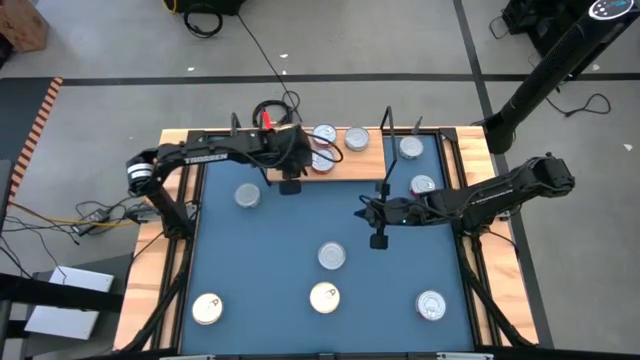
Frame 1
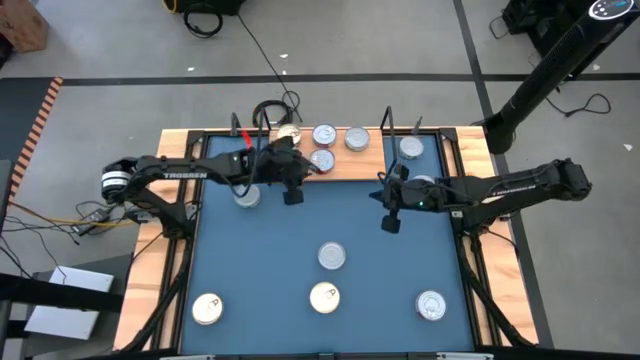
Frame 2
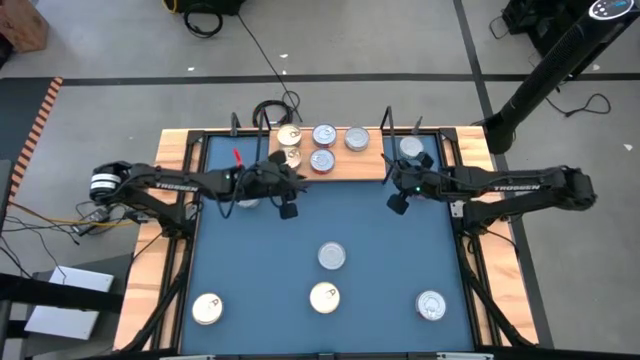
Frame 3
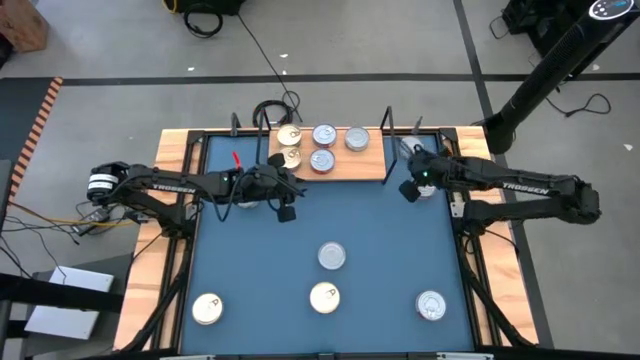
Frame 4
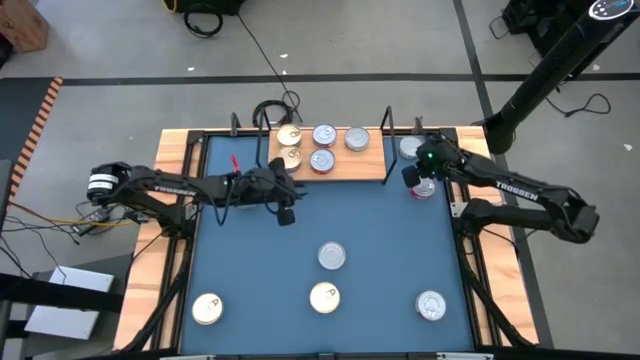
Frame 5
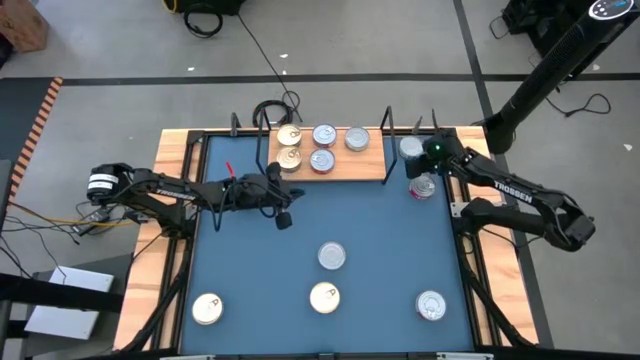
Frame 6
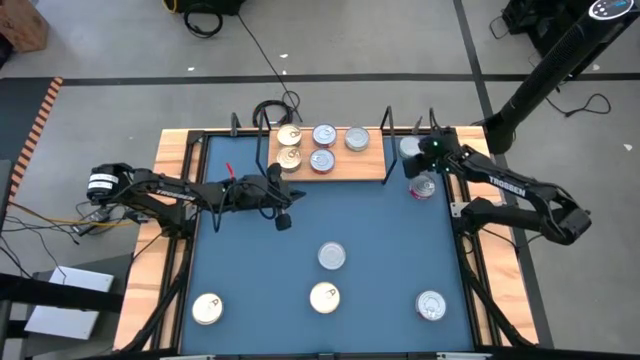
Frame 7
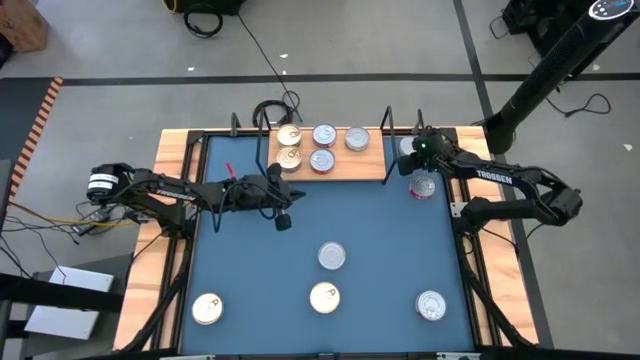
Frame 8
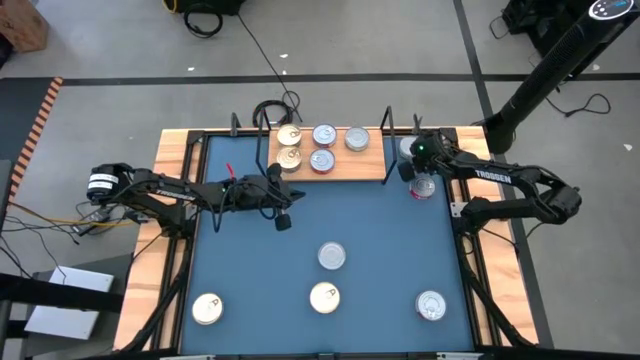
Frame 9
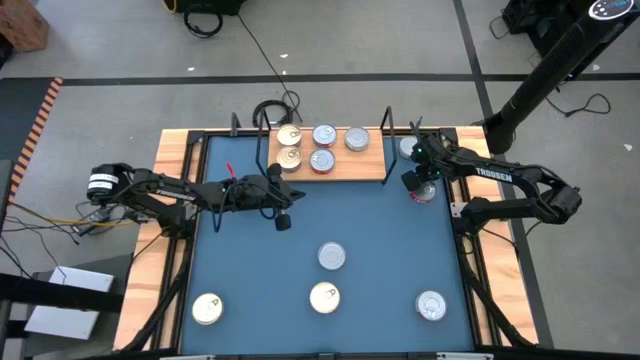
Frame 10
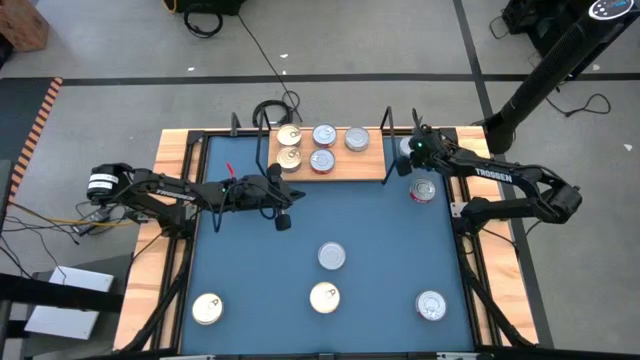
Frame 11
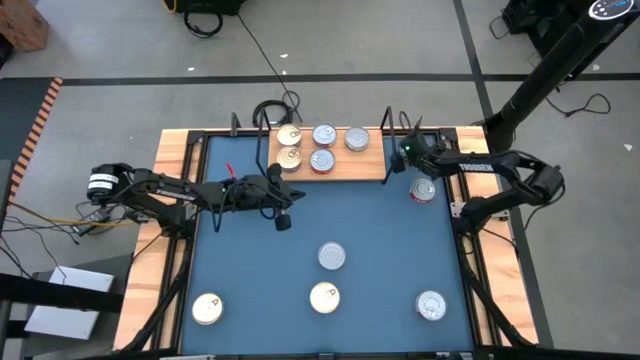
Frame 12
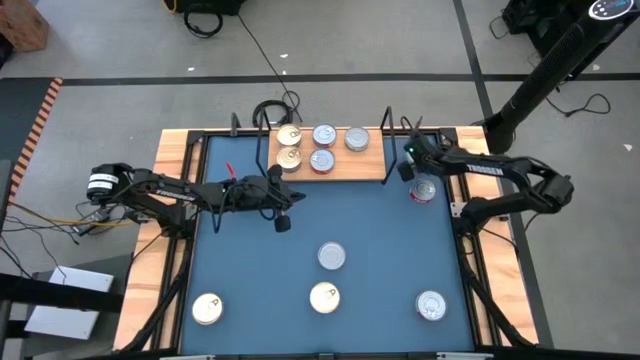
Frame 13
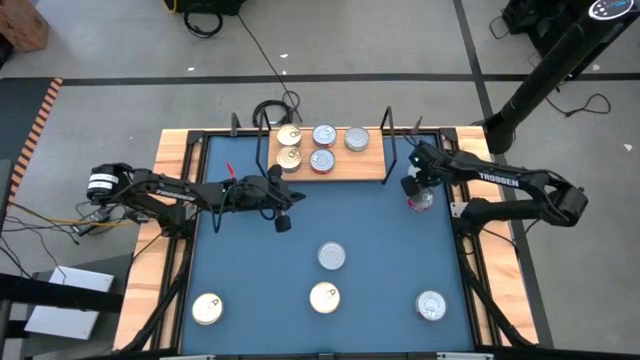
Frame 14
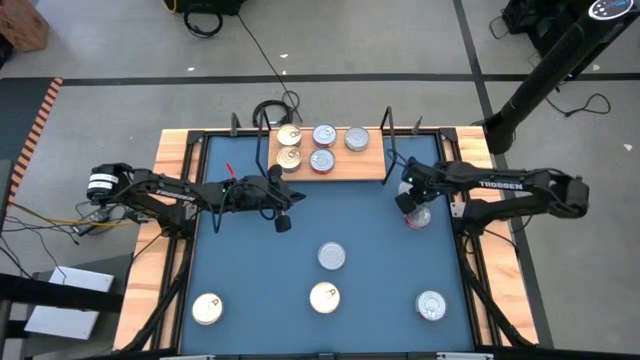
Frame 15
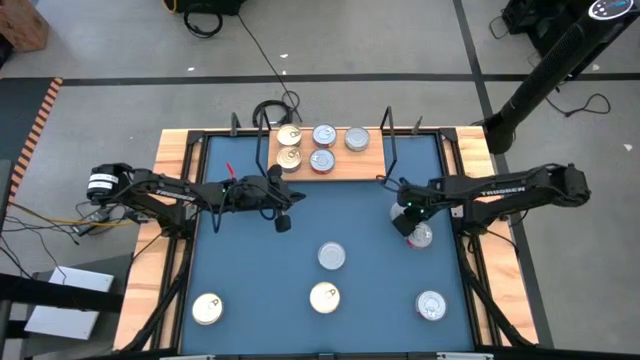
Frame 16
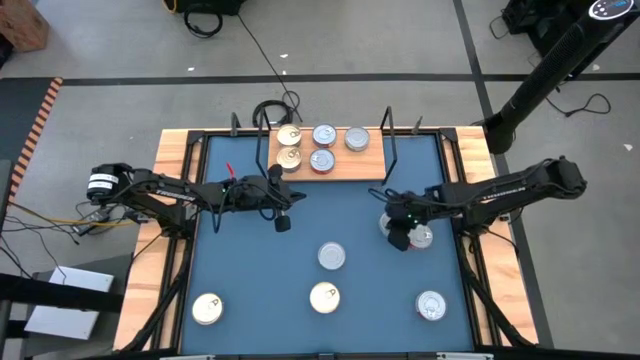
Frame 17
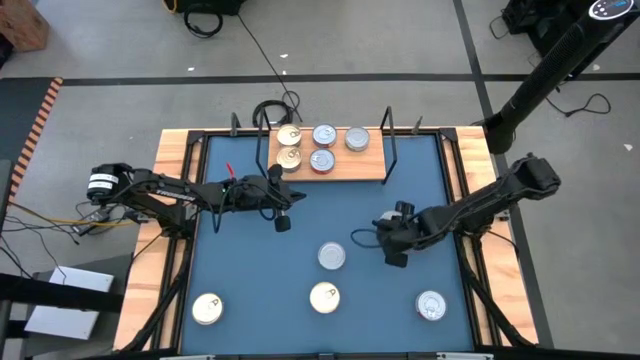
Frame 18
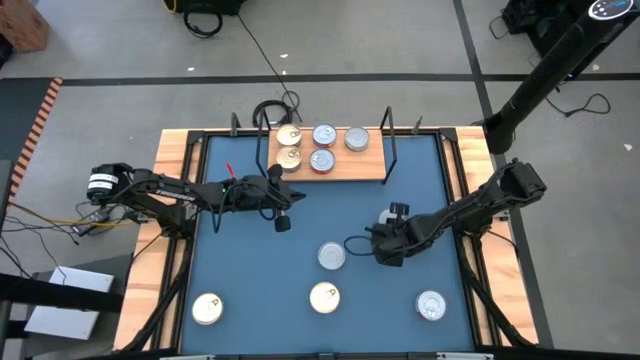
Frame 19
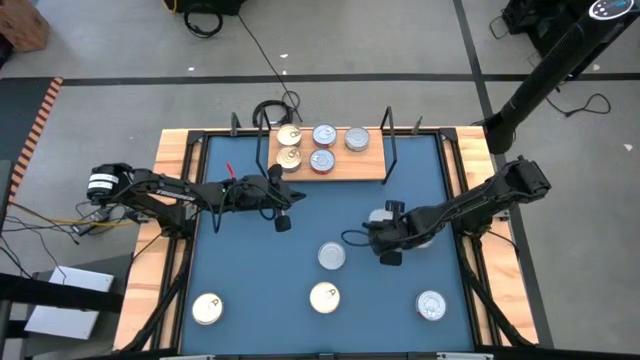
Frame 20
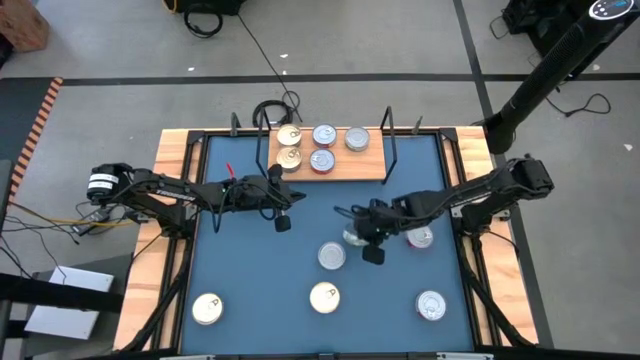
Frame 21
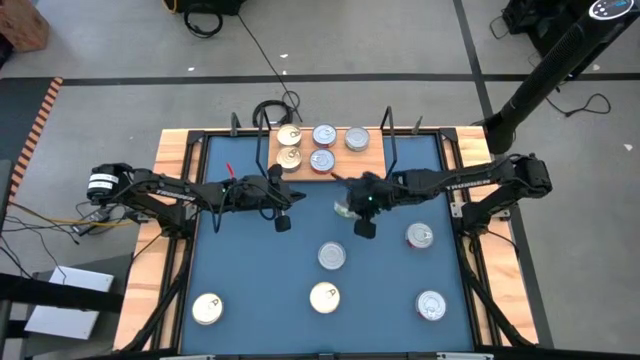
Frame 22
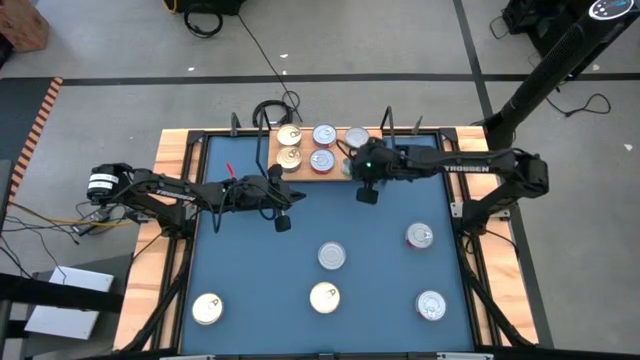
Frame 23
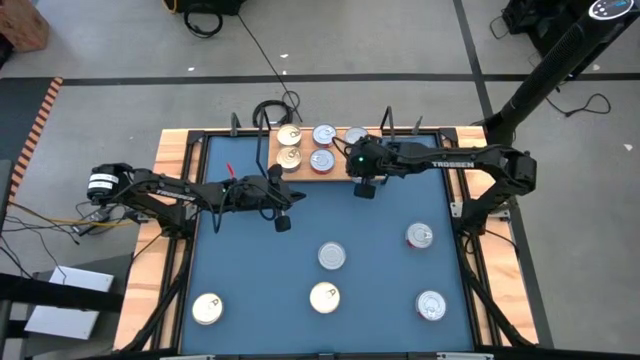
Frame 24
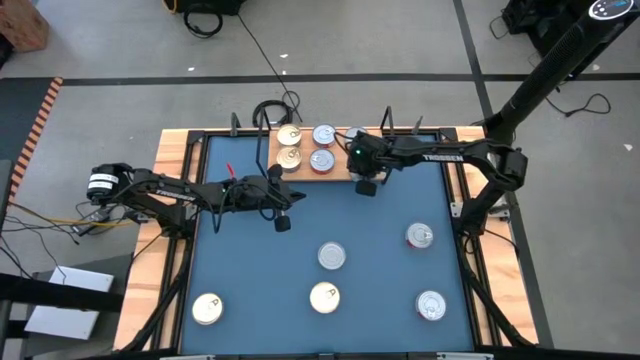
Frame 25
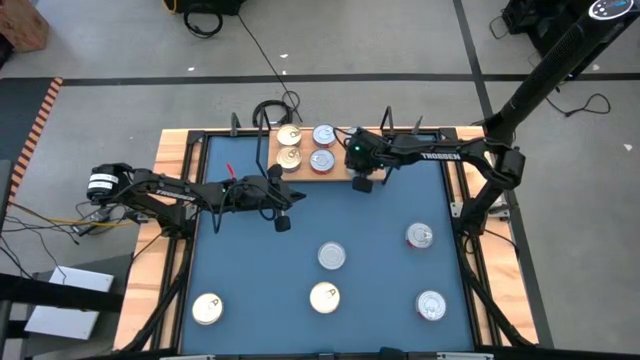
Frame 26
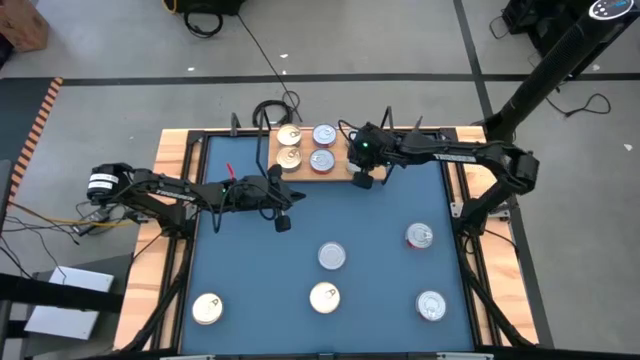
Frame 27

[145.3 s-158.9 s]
Task: Stack canned seafood by type on shelf
Put the top right white tuna can on the shelf

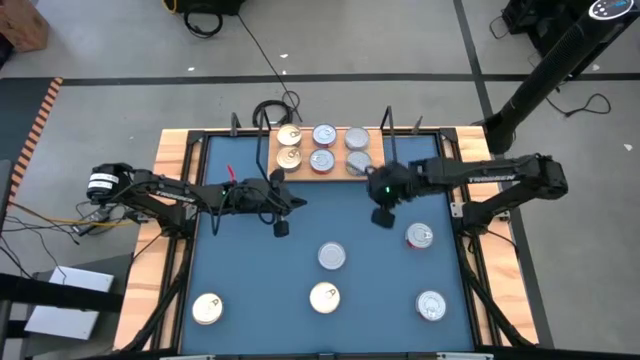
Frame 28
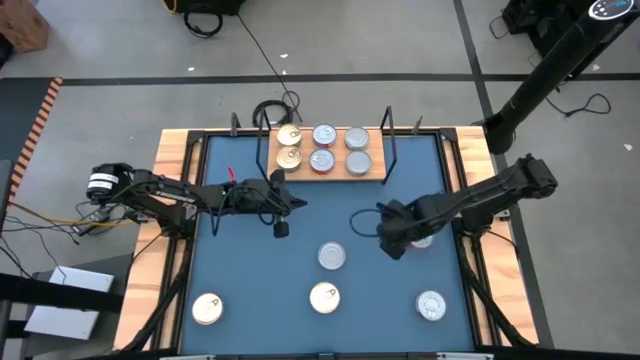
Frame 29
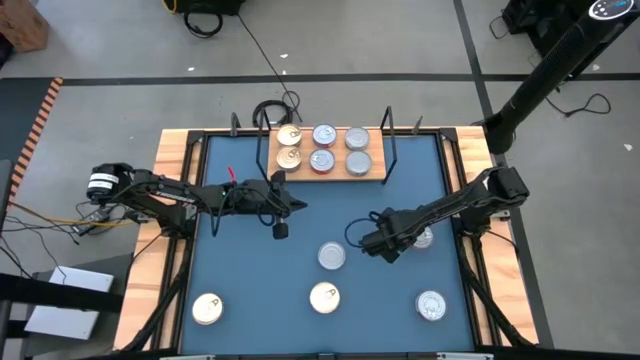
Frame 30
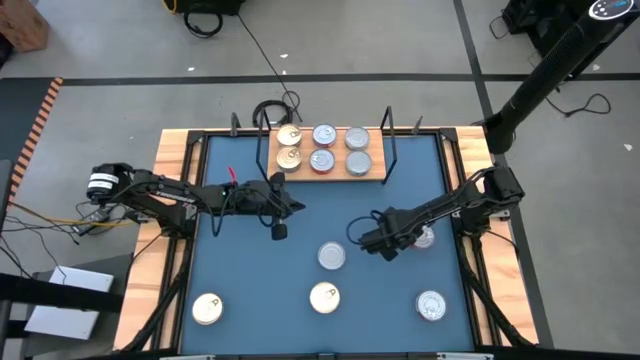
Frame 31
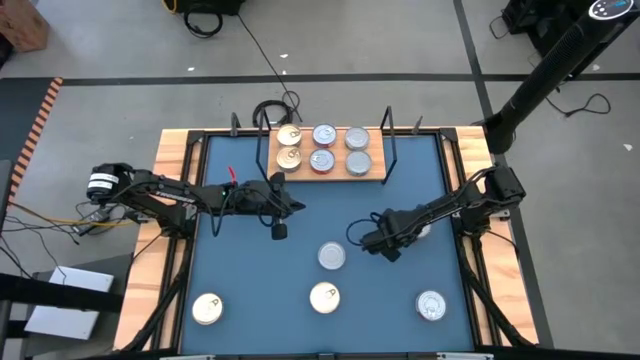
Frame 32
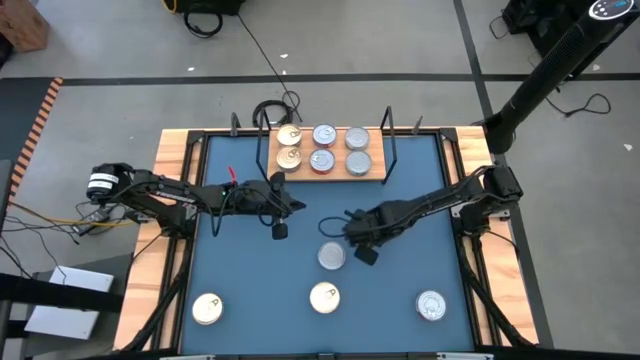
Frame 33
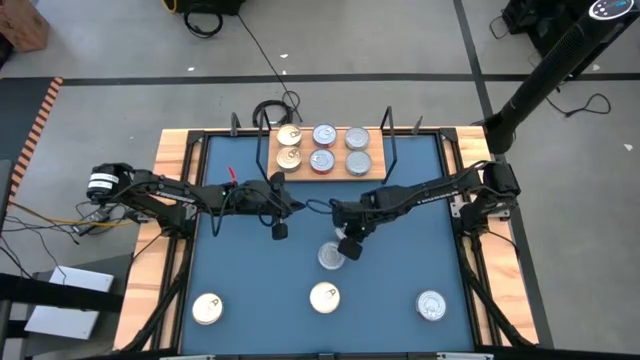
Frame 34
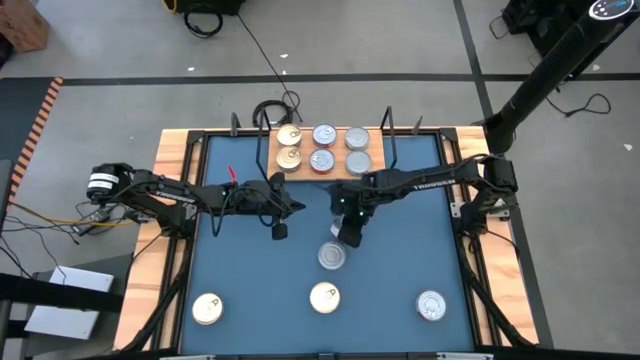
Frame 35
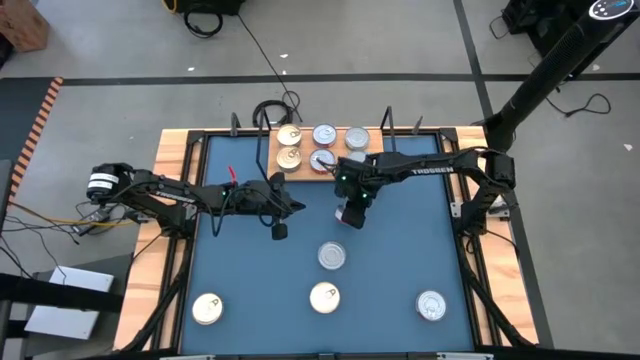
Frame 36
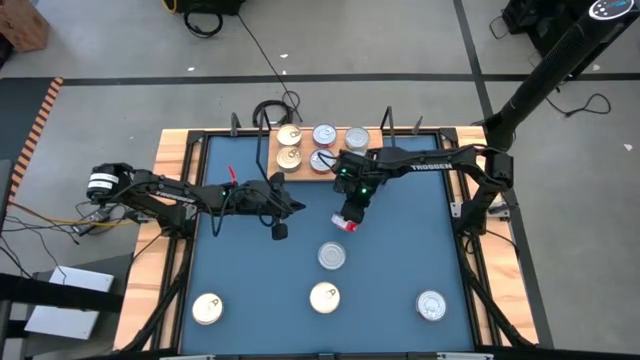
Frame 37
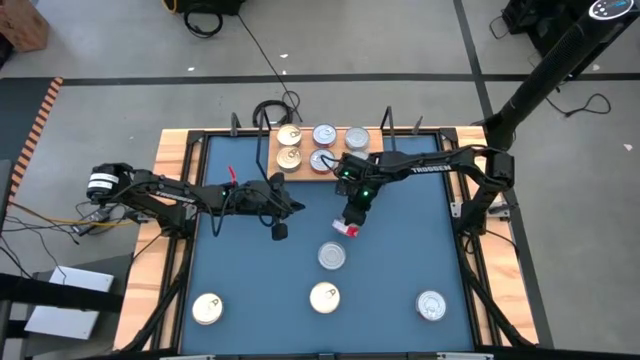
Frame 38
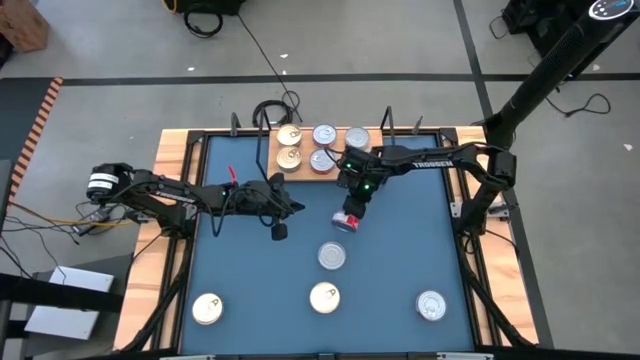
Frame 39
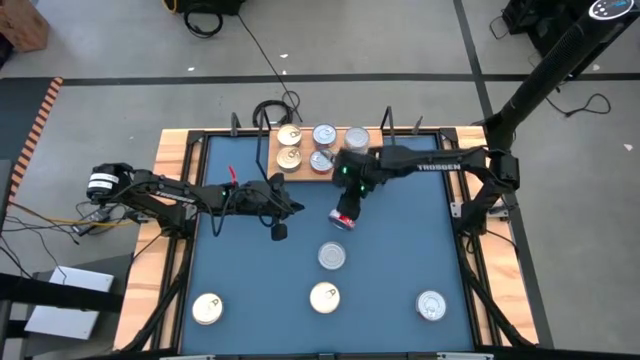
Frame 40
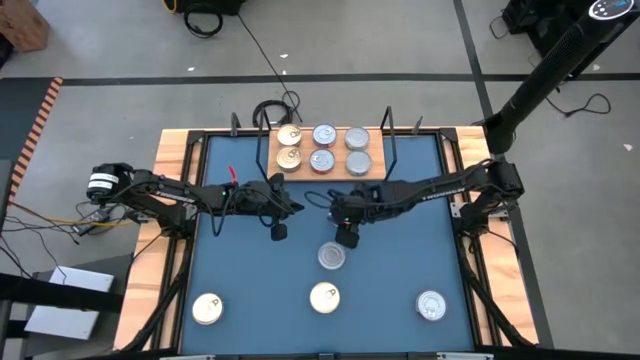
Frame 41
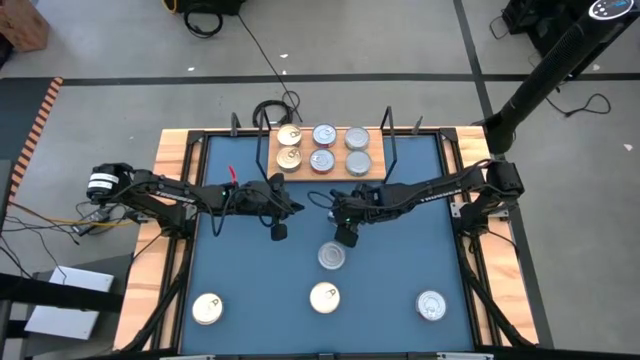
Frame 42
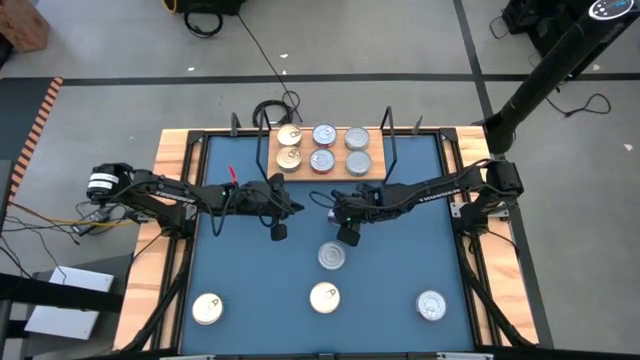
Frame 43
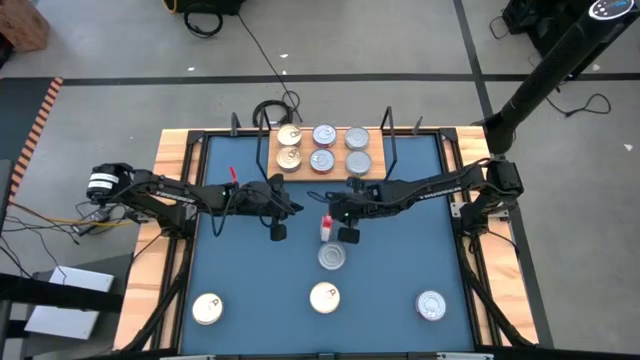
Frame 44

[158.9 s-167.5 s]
Stack the top red tuna can on top red tuna can on the shelf
